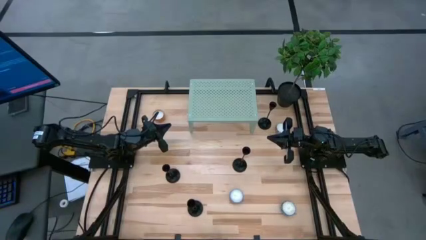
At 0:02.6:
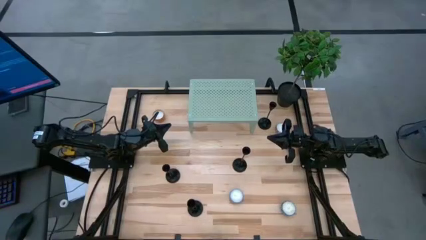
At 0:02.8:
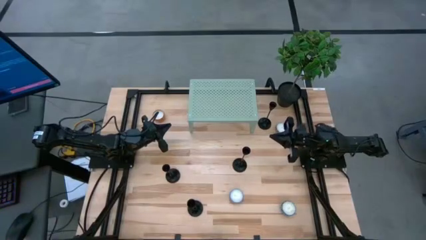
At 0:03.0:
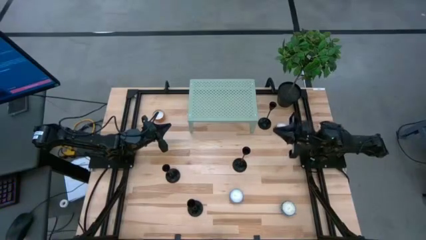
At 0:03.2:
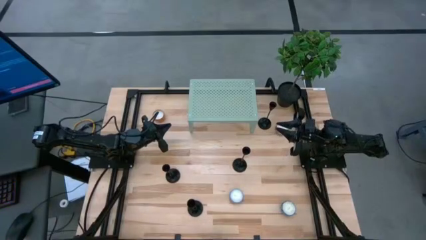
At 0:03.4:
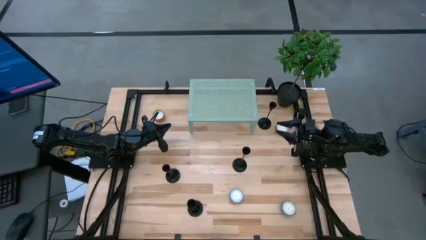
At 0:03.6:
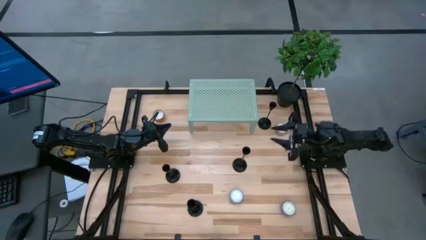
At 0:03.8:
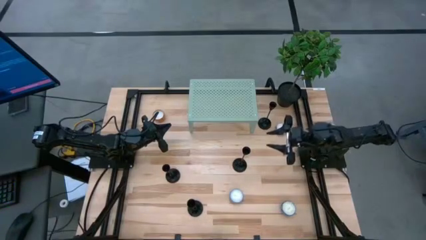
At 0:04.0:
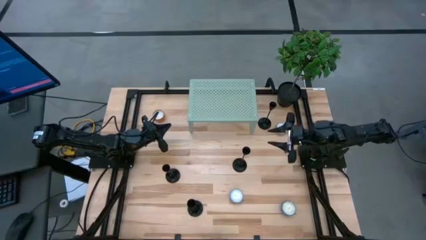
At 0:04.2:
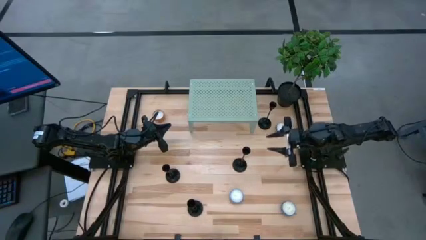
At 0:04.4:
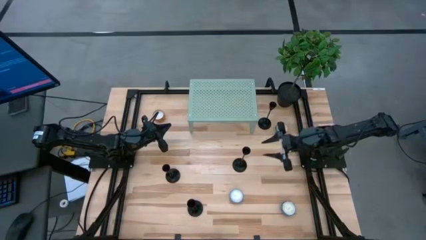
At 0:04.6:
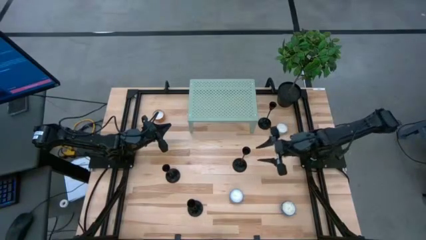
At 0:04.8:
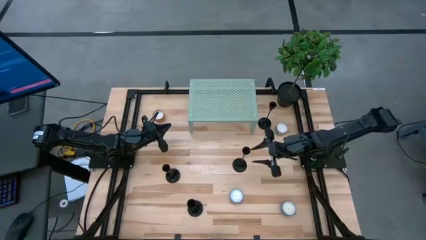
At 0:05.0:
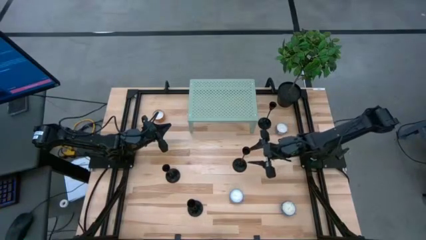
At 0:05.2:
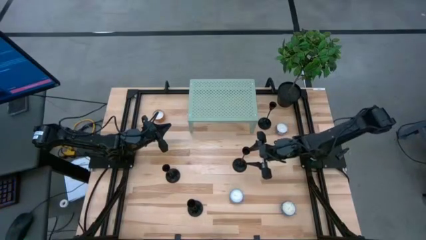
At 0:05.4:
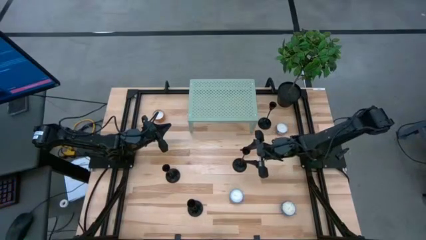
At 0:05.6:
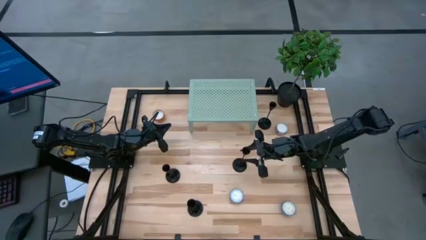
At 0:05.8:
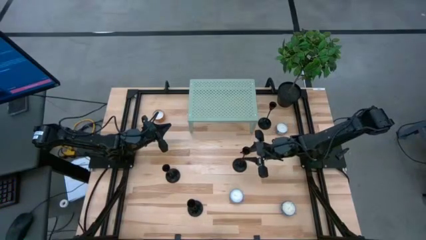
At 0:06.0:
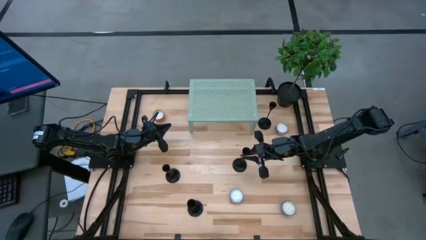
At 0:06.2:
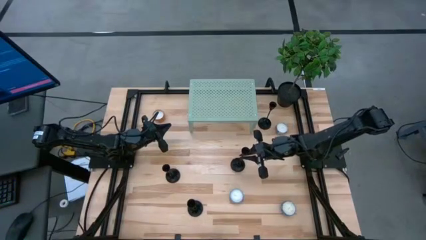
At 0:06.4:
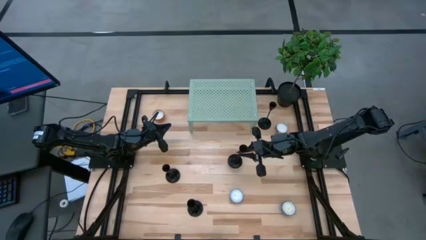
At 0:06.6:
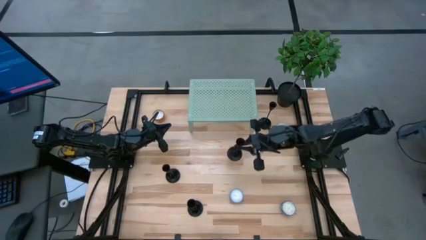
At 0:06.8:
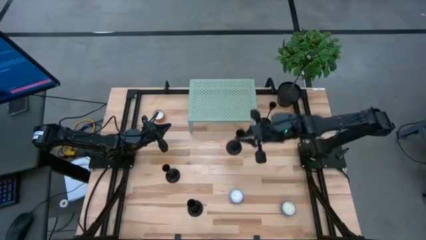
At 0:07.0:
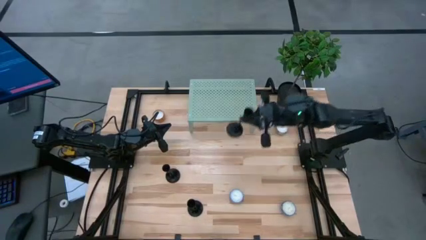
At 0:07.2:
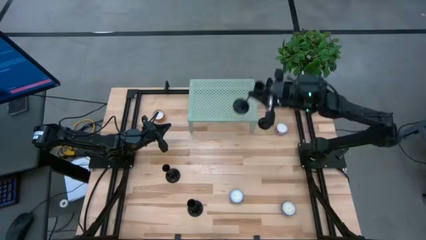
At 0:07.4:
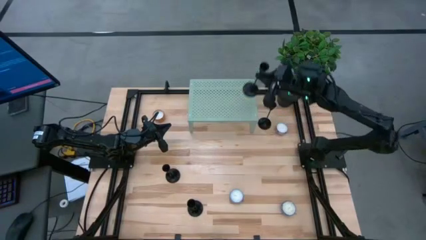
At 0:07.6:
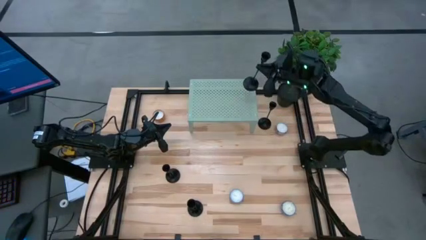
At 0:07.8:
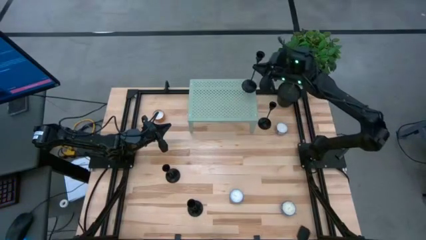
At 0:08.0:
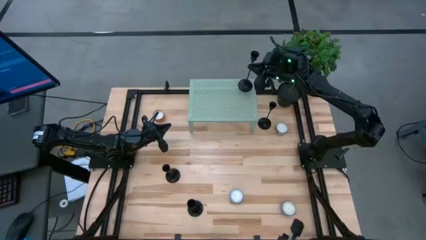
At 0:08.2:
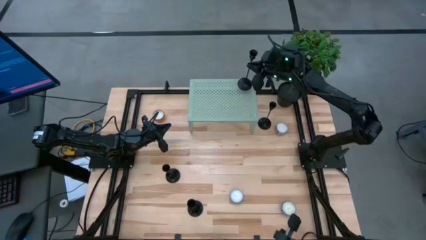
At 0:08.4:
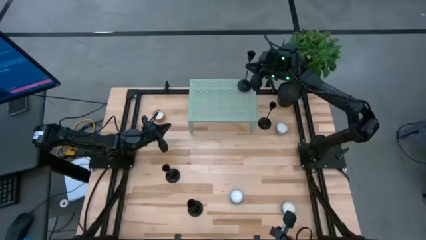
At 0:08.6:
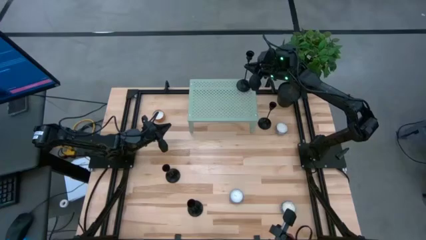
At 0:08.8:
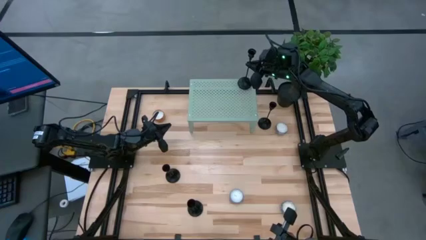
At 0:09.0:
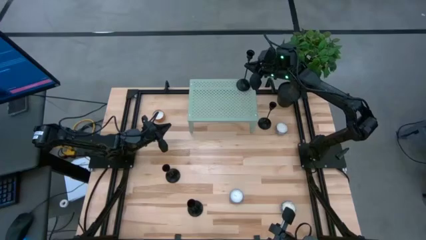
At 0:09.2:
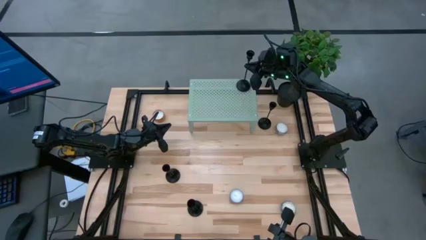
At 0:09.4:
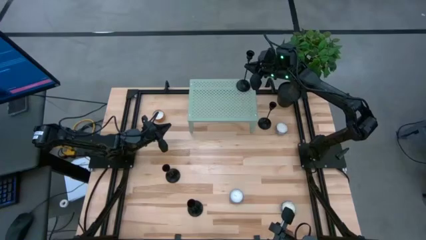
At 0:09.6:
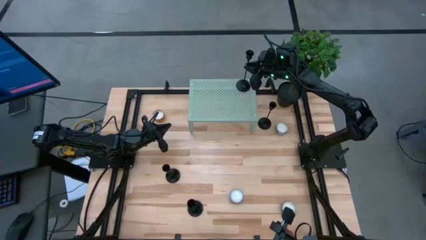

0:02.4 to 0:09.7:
Task: Pick & Place candle stick holders
Put the black candle holder on the shelf

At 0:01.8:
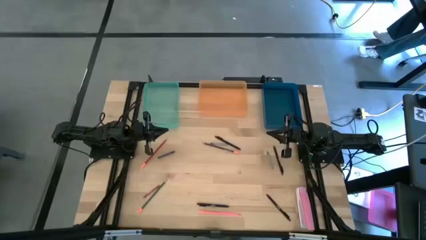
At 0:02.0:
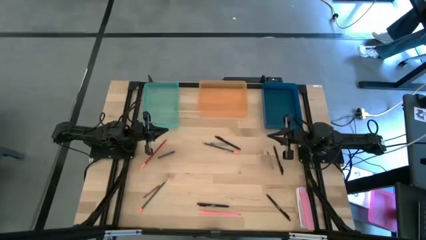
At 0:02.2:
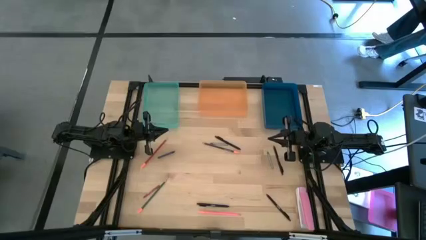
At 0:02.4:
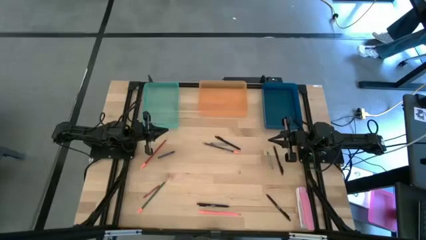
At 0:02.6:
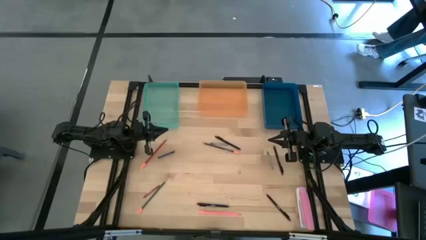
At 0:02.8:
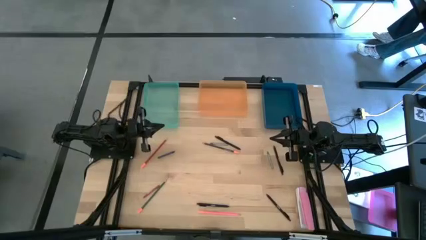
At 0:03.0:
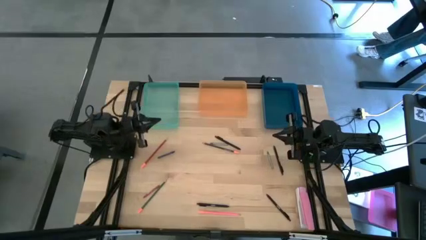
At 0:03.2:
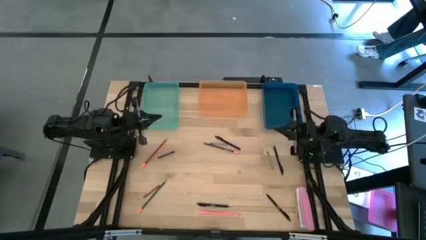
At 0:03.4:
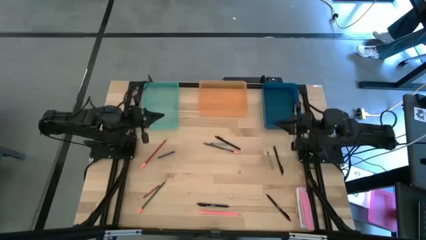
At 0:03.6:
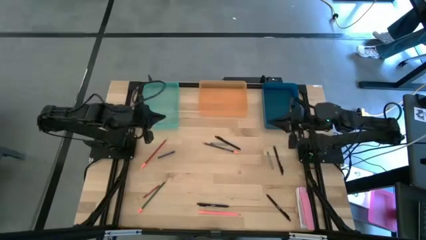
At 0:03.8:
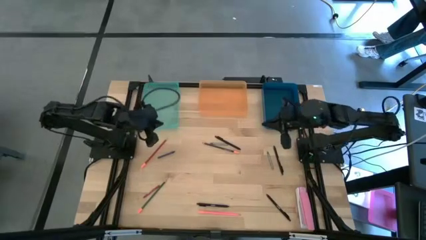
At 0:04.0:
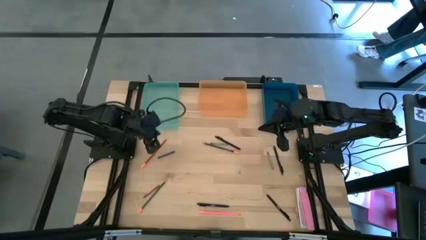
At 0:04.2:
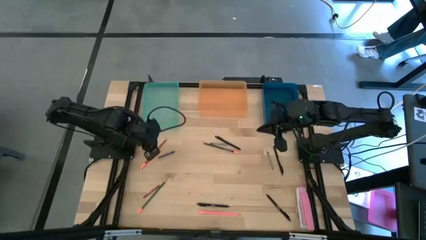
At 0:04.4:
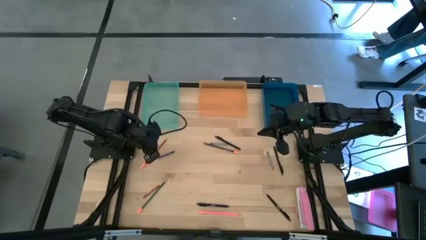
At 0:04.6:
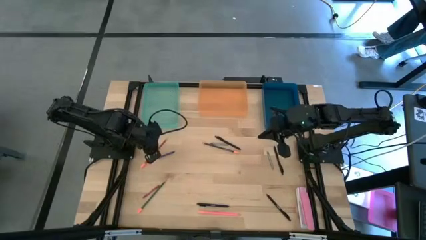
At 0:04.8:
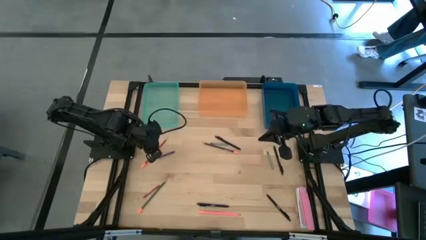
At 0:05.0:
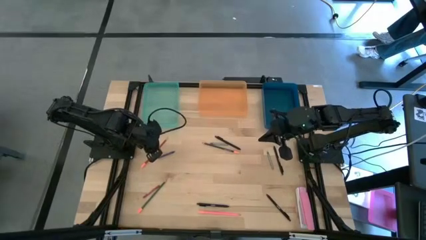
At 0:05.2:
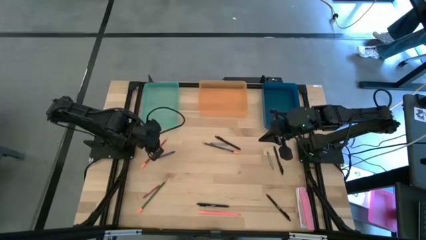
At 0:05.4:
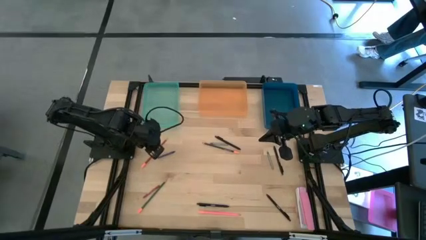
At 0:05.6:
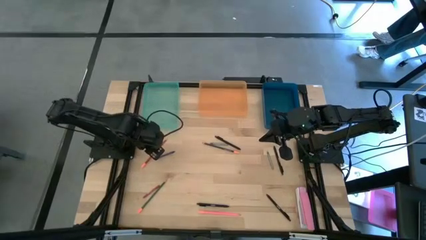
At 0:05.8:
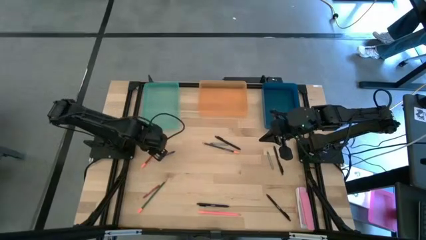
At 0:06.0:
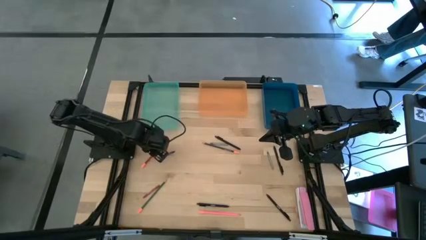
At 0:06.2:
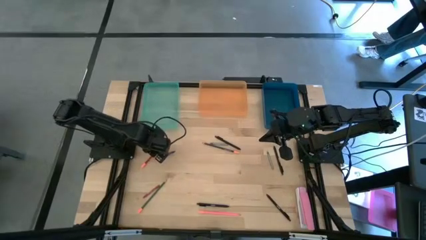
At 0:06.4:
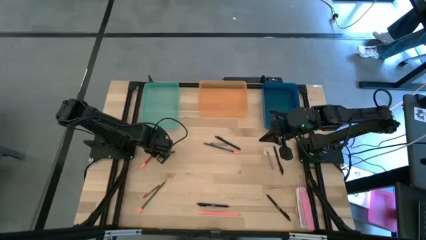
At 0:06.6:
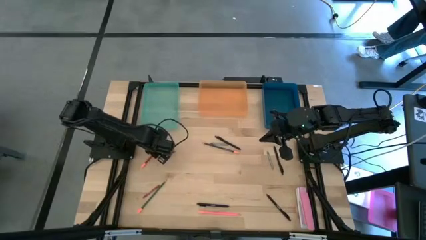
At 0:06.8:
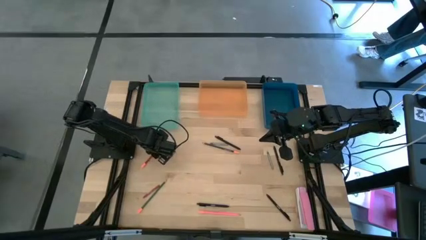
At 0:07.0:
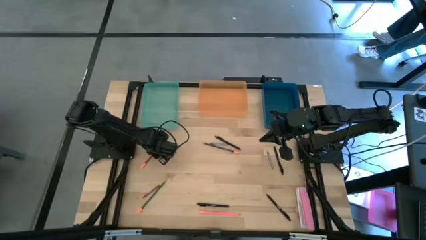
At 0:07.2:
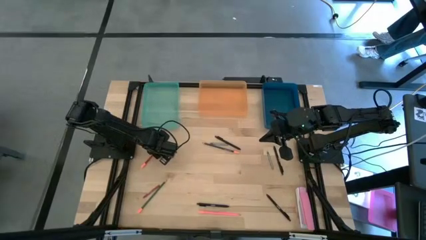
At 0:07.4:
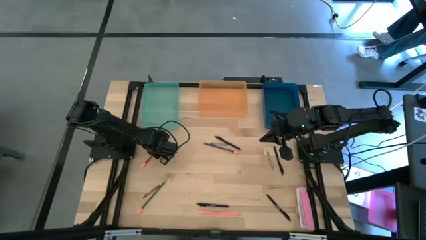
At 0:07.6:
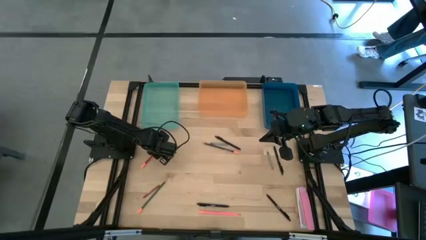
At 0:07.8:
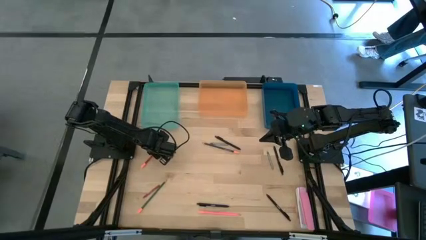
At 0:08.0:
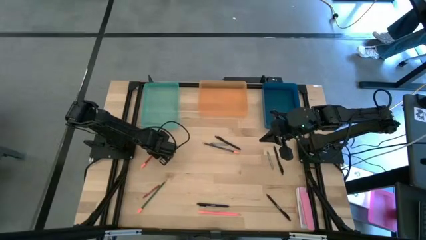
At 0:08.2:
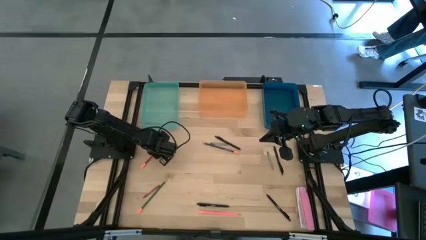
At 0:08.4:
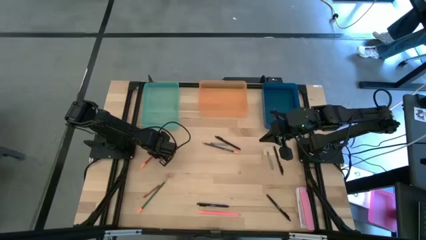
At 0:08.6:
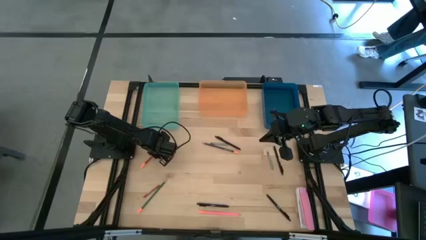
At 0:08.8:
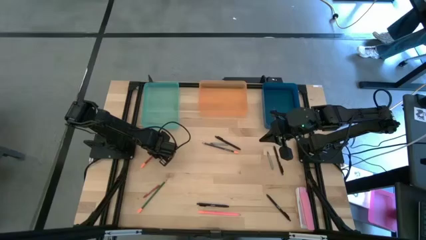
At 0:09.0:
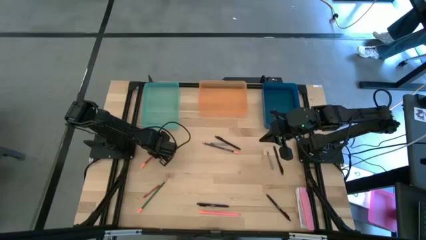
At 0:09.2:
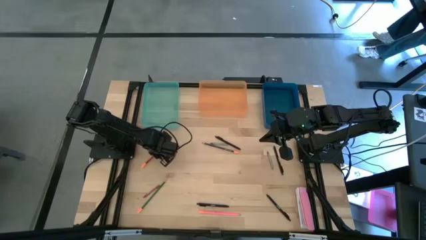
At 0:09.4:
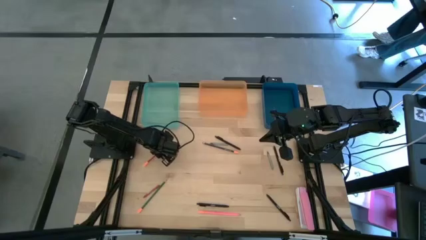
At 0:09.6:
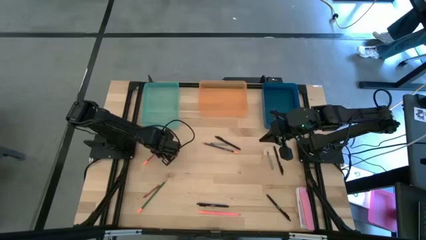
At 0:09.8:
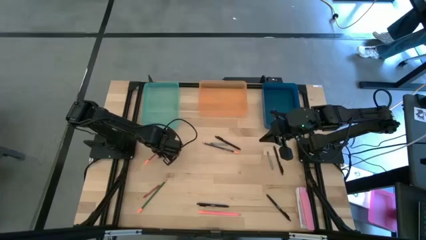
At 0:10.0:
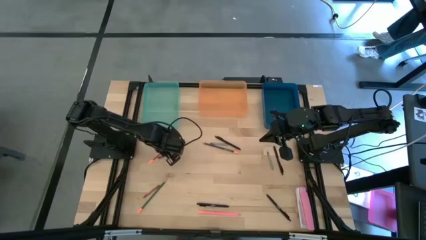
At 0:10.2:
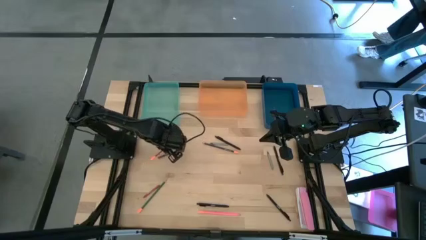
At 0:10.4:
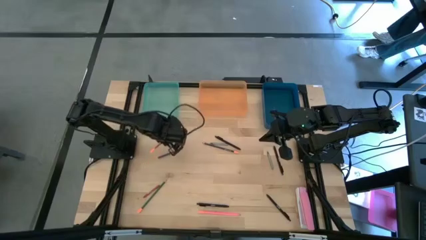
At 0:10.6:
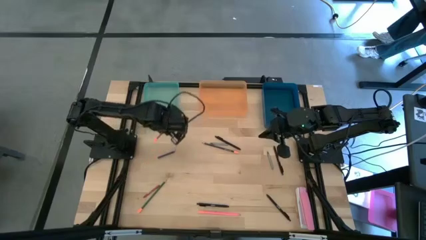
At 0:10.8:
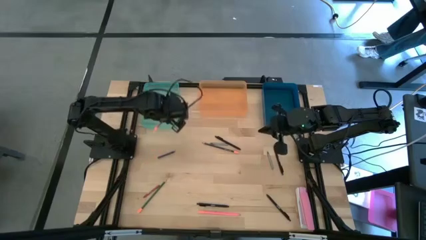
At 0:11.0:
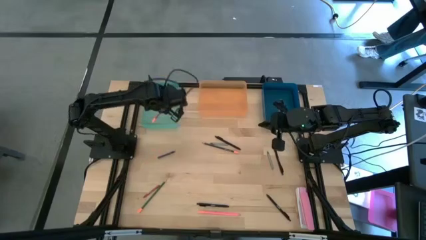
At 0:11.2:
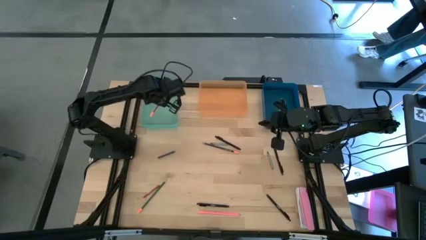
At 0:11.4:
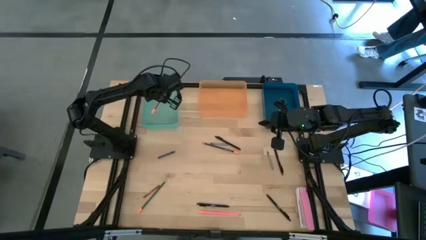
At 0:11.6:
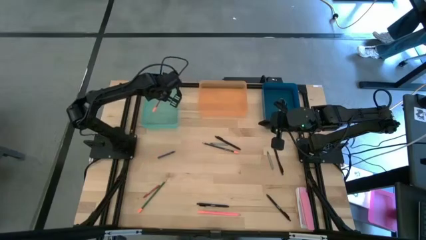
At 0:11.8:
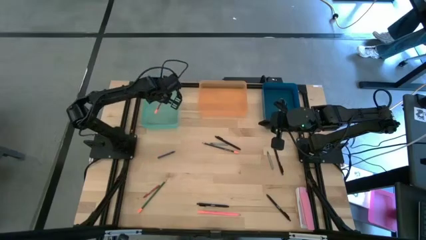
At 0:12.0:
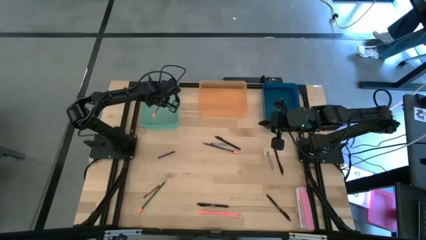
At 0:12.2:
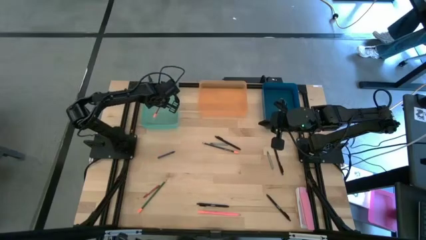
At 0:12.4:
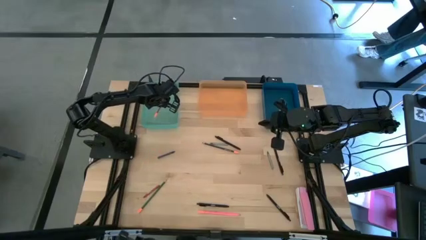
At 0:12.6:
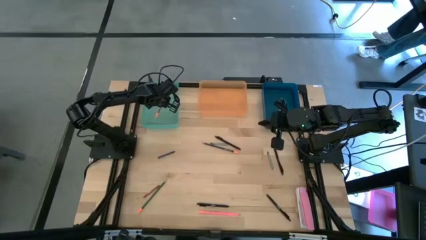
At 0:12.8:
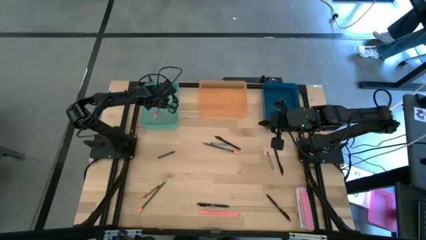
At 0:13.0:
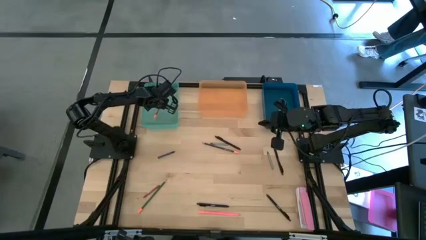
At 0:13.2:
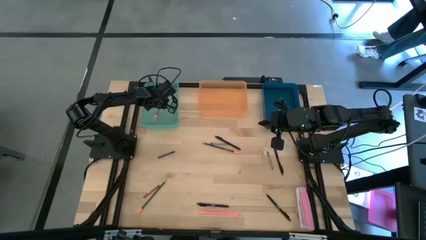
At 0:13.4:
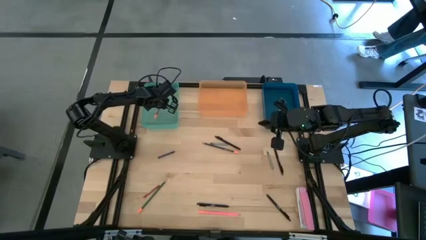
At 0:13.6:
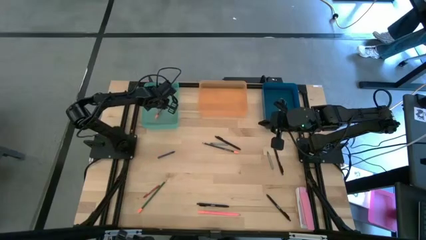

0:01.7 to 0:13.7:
Task: Sort crayons/erasers/pens/pencils in bins
Put the red pencil into the light blue bin
